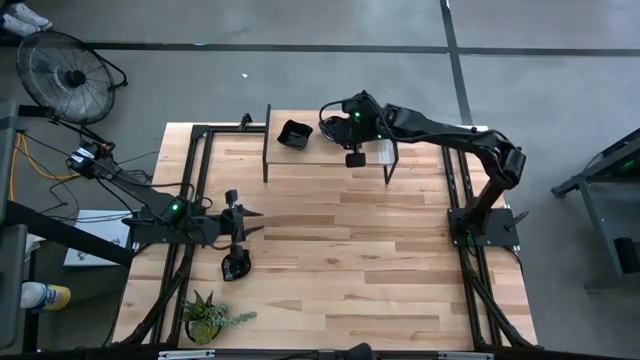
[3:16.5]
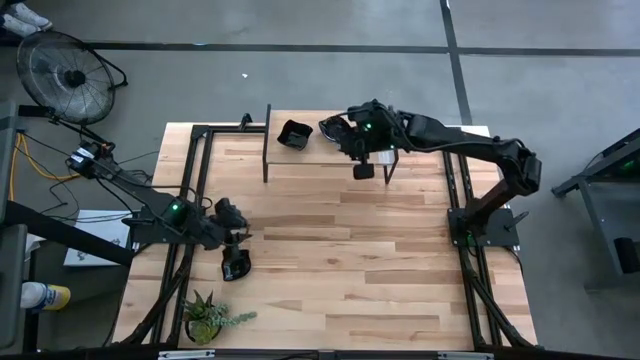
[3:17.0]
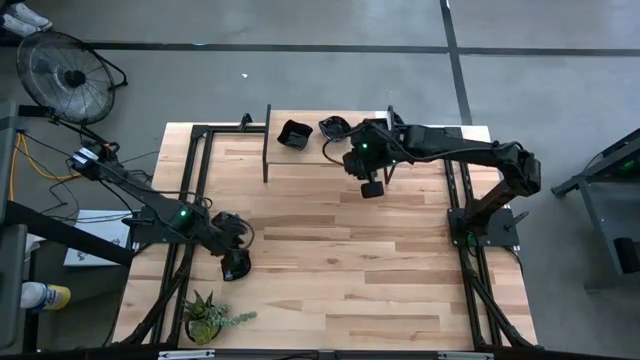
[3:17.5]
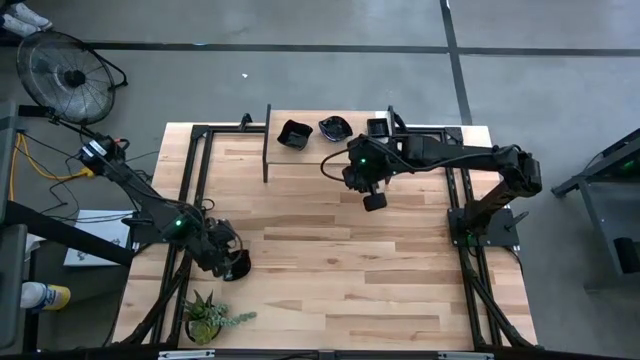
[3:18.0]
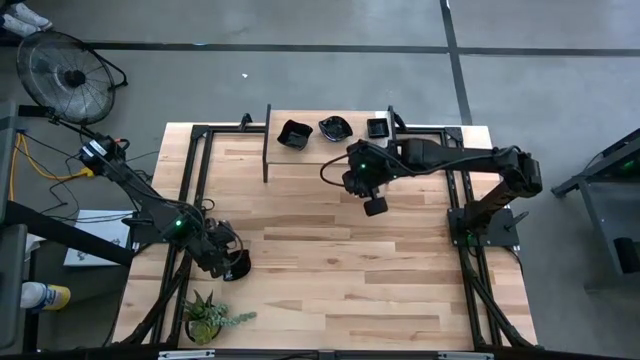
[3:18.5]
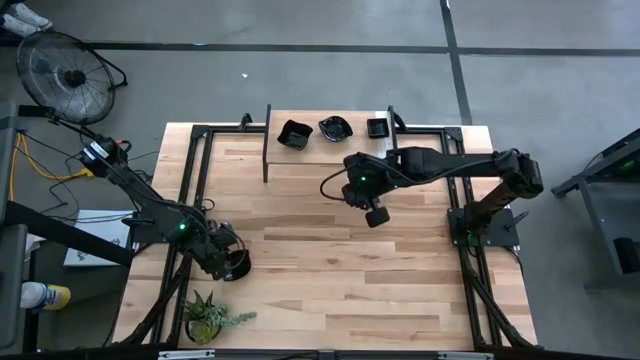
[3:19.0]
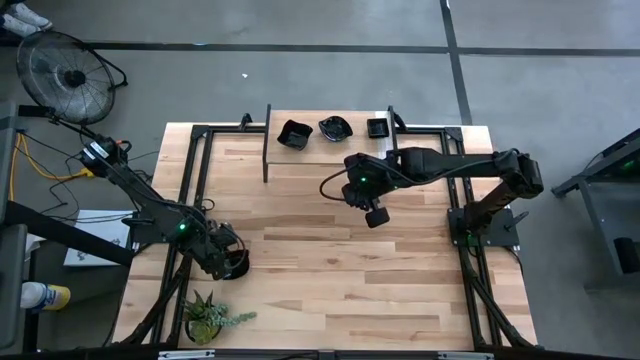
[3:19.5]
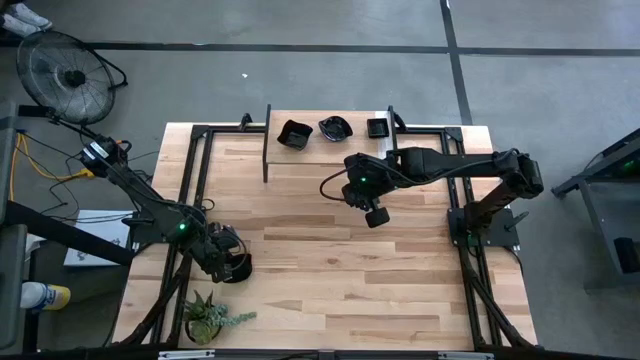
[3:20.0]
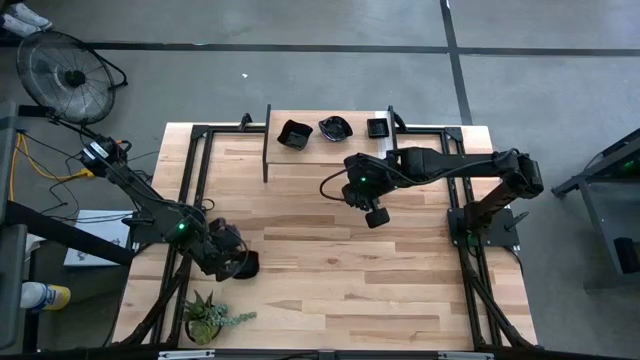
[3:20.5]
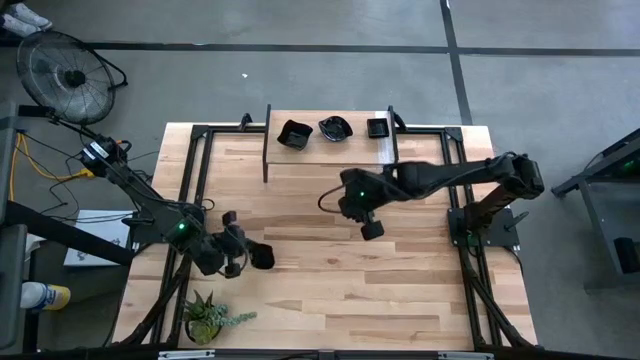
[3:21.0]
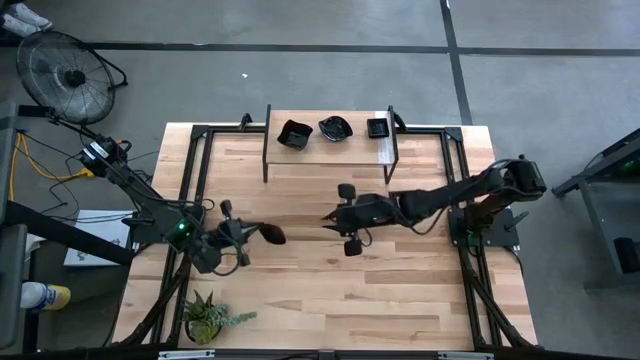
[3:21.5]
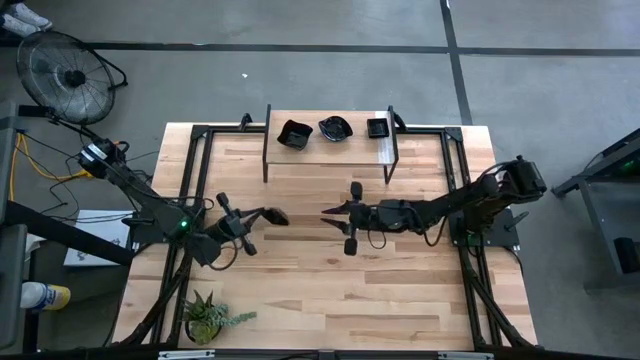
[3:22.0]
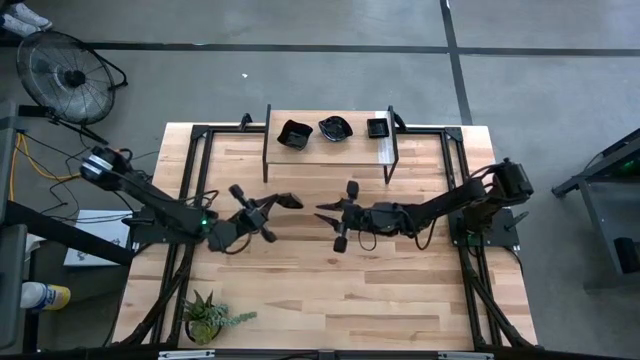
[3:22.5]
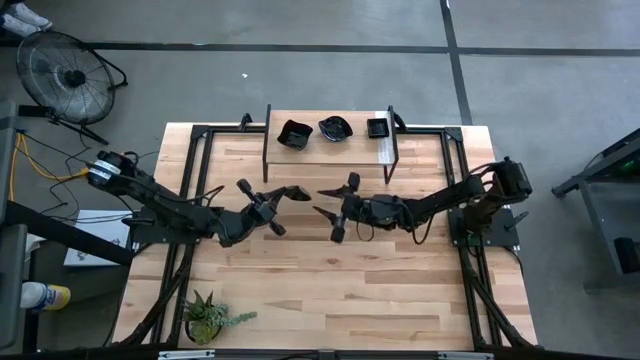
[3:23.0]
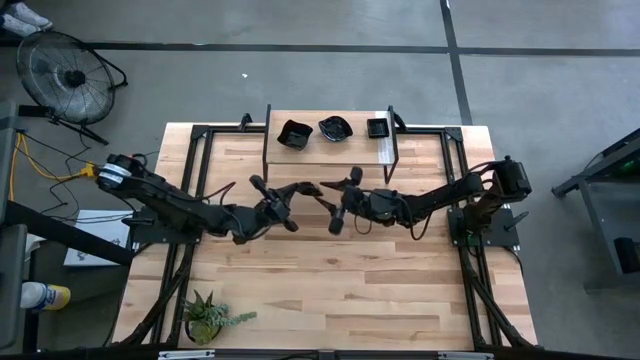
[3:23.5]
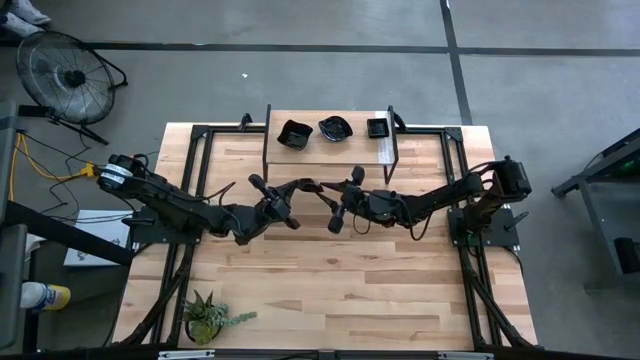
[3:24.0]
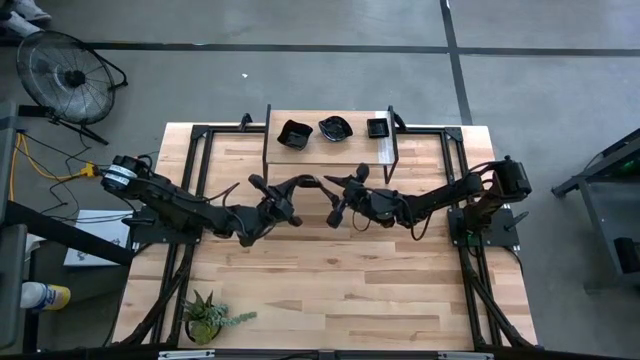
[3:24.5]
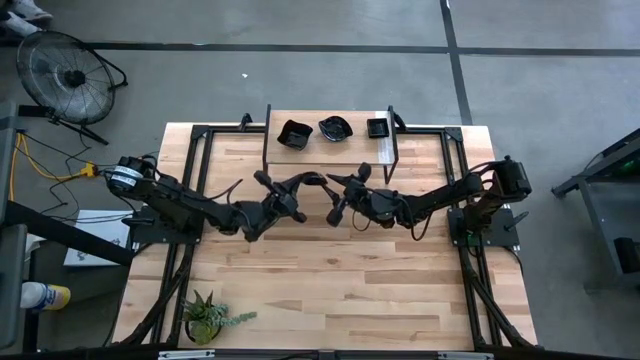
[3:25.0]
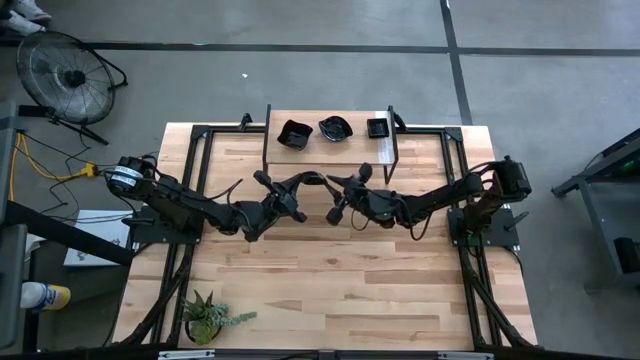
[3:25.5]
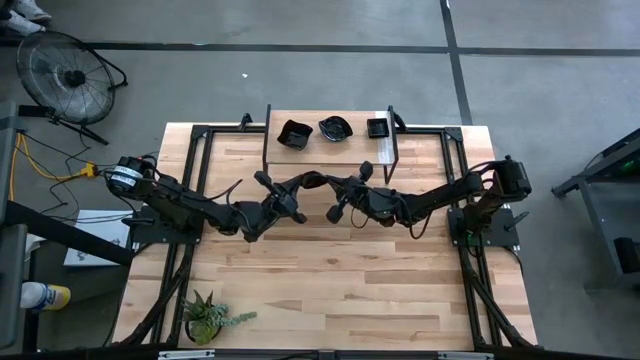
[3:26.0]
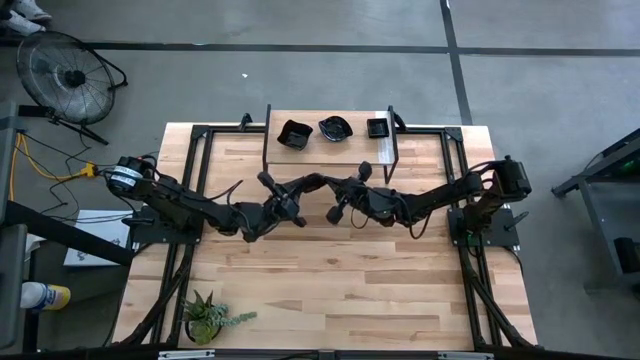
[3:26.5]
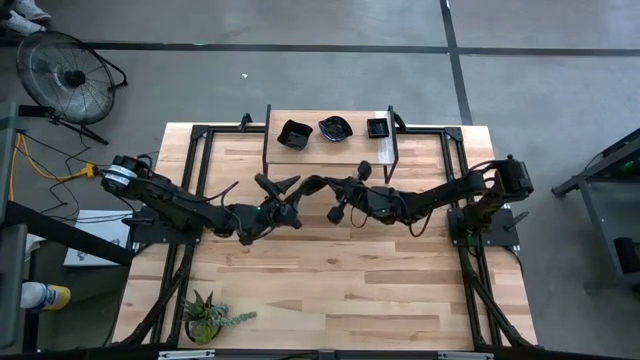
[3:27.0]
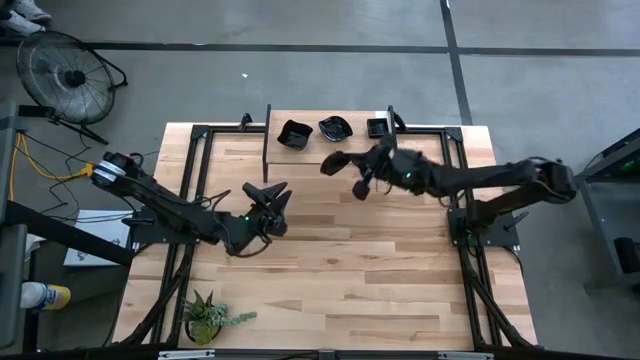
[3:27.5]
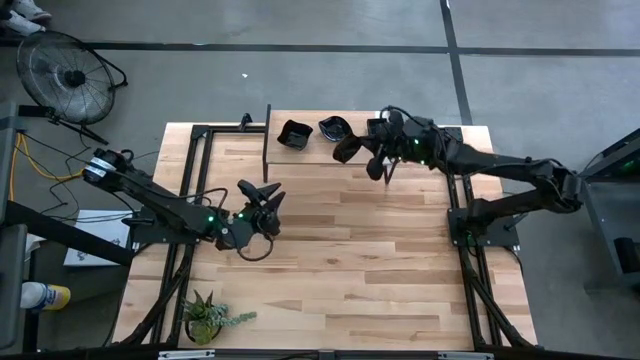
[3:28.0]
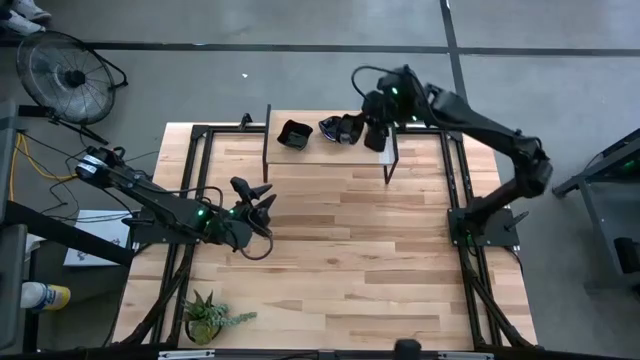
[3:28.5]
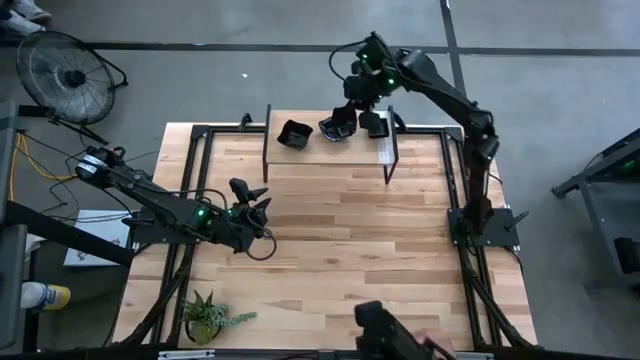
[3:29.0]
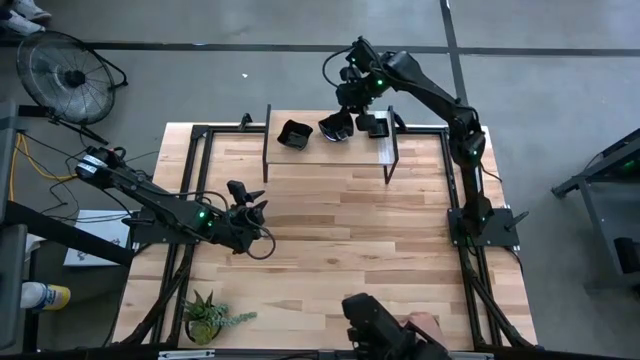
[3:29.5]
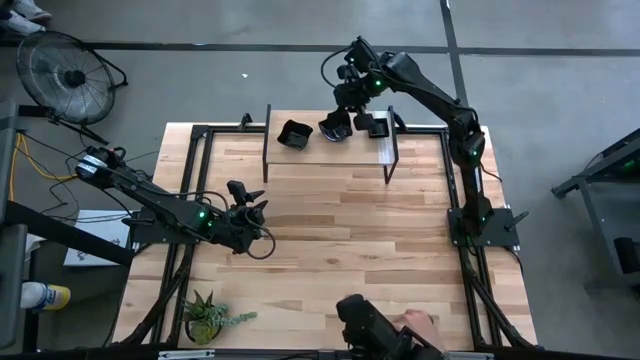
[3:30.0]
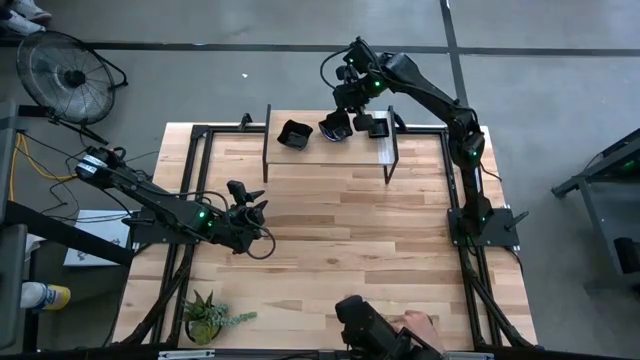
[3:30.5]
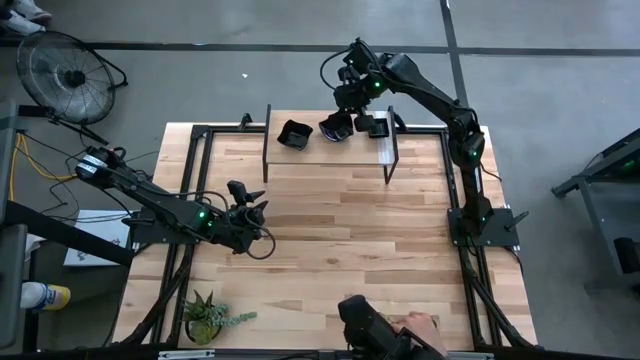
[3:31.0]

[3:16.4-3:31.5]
Task: Pick & Place Mini shaped plates
Stack the black leaf shaped plate on top of the black leaf shaped plate on the shelf

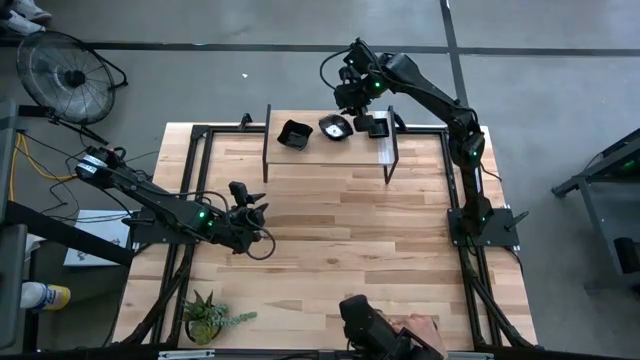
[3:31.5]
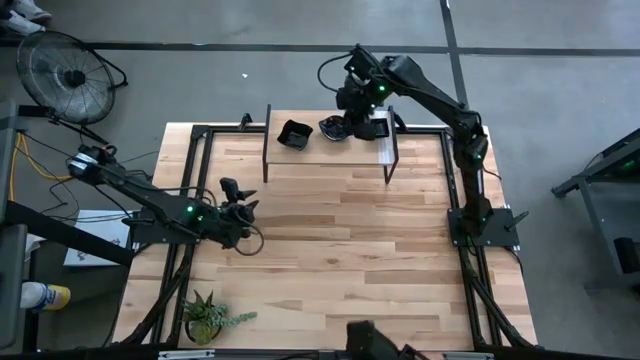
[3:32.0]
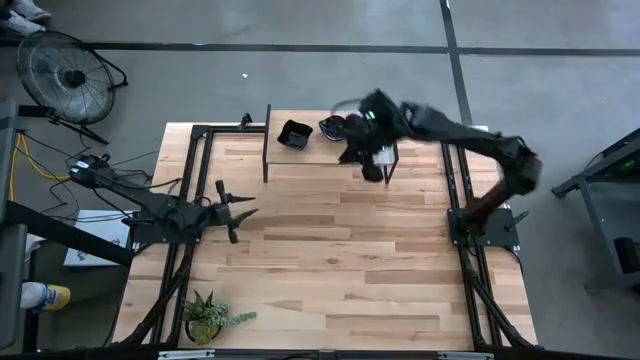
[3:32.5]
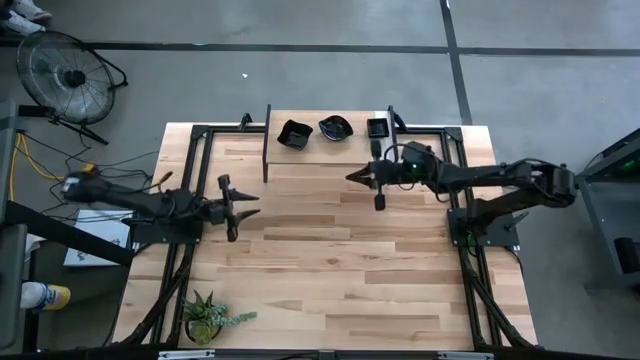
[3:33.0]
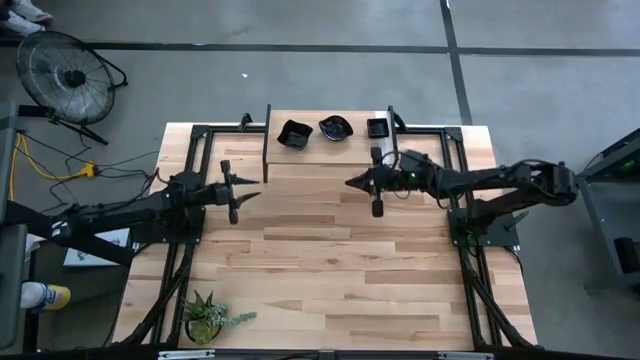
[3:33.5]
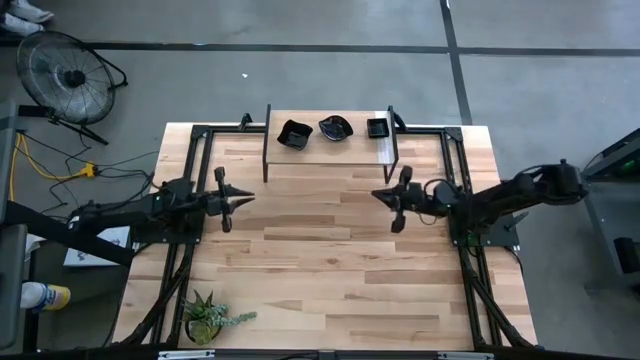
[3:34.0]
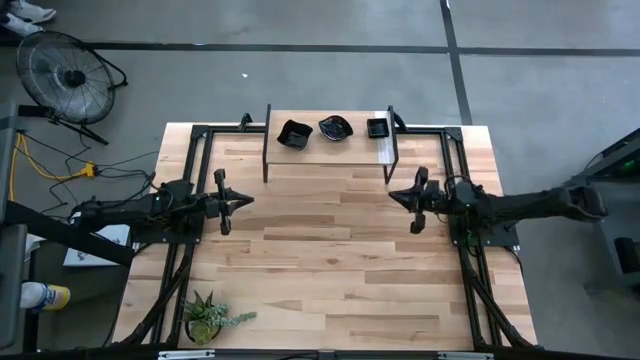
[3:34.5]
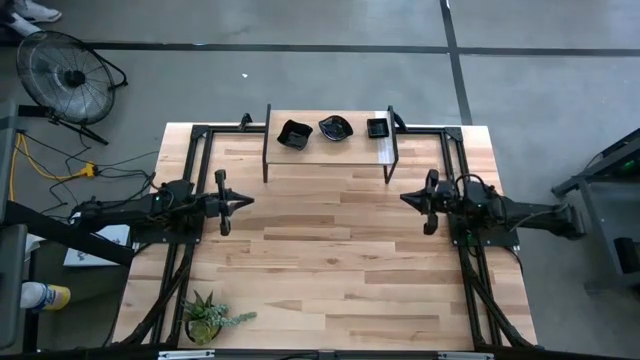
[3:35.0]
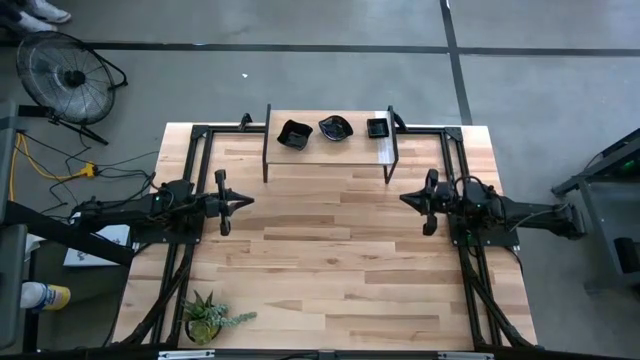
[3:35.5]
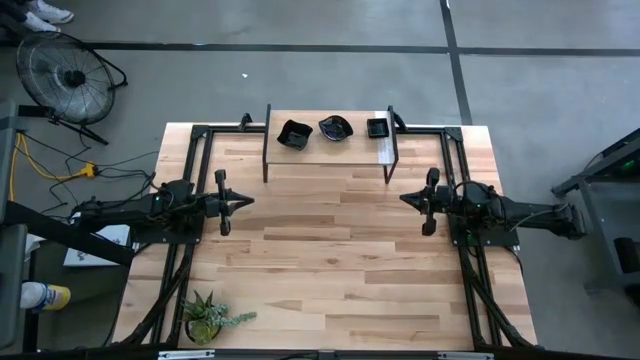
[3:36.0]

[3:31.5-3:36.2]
Return To Home Position

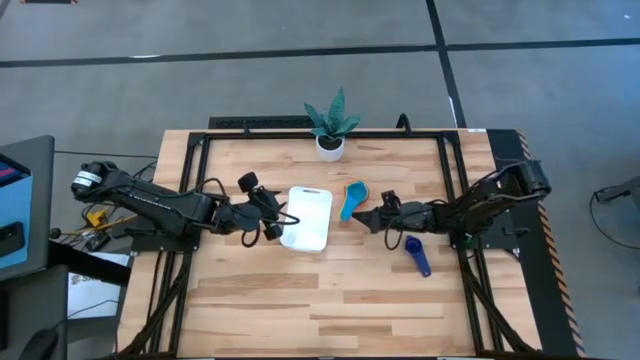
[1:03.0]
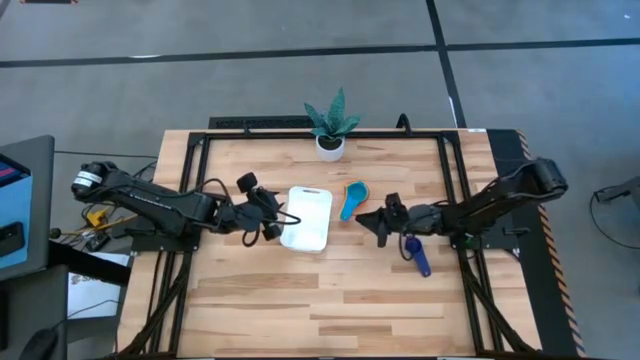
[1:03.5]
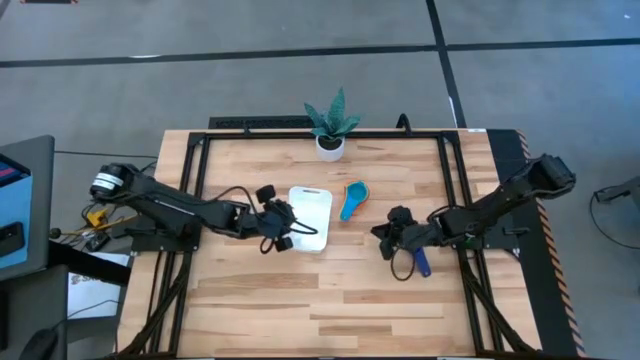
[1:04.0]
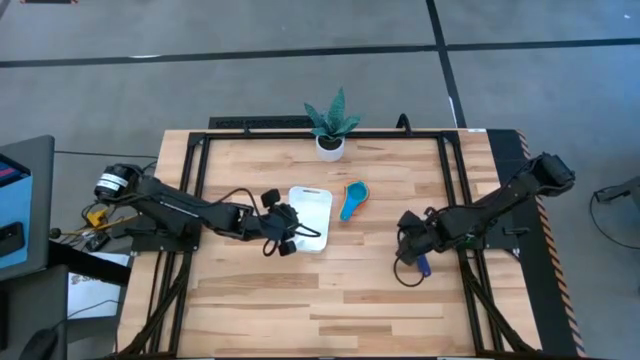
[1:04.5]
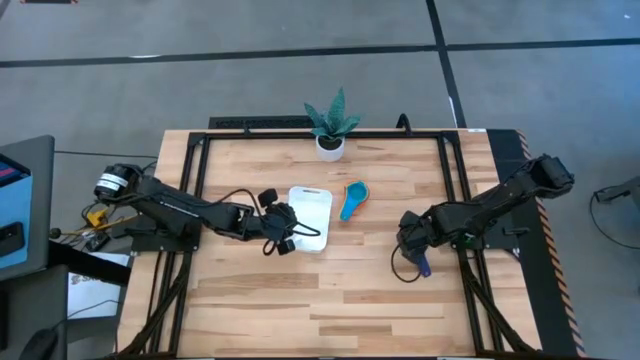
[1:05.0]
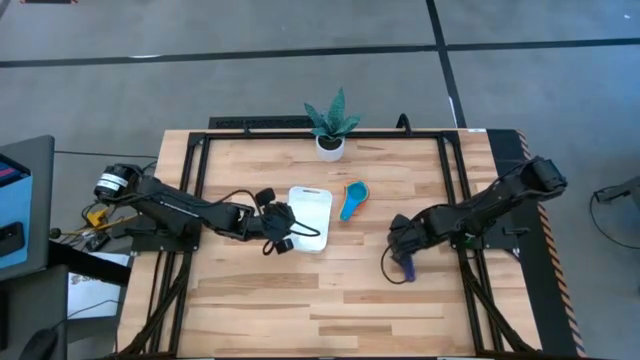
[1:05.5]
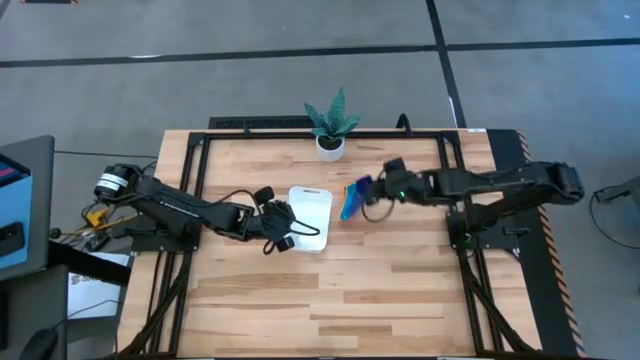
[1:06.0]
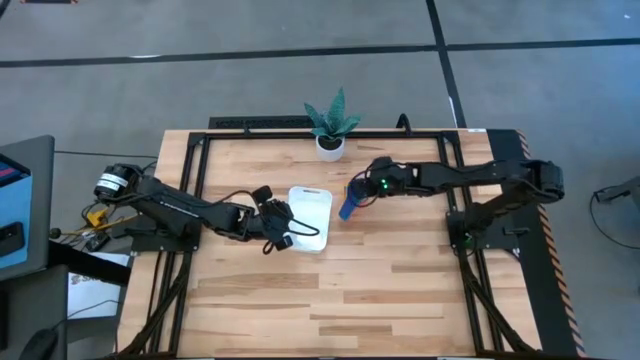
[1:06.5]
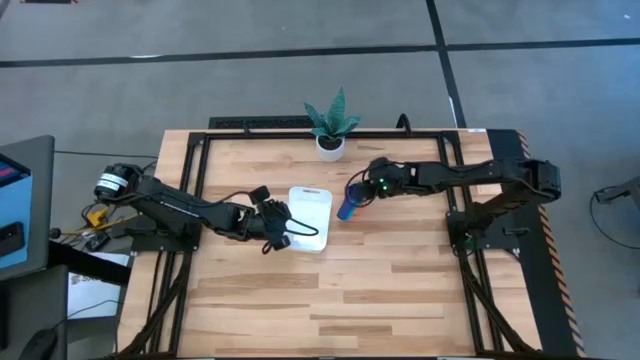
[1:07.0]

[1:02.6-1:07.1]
Task: Nest measuring cups in basket
Stack the dark blue measuring cup on top of the light blue measuring cup
